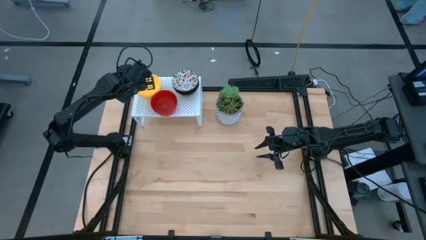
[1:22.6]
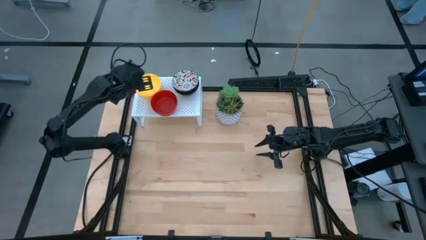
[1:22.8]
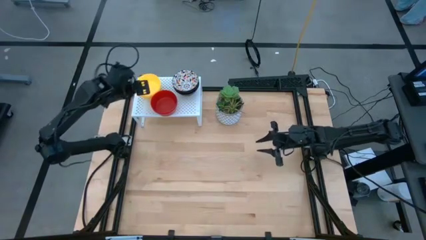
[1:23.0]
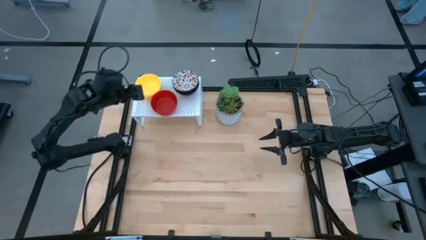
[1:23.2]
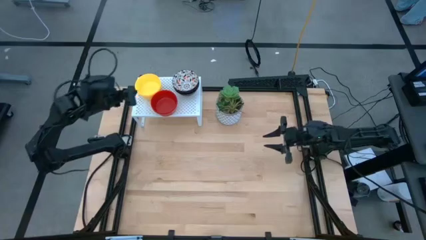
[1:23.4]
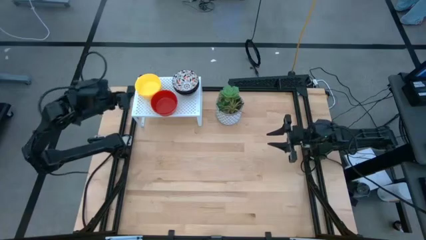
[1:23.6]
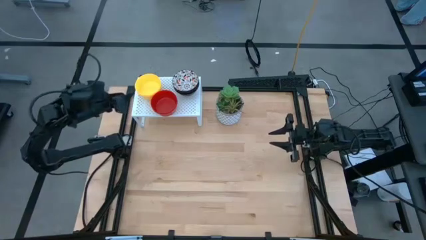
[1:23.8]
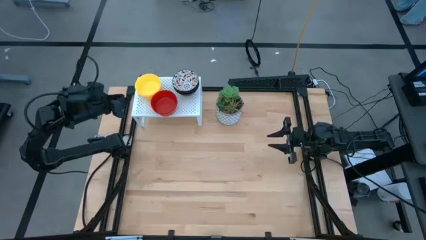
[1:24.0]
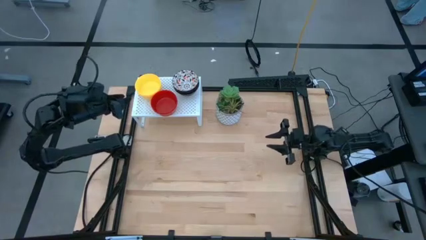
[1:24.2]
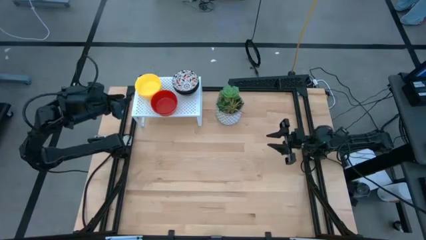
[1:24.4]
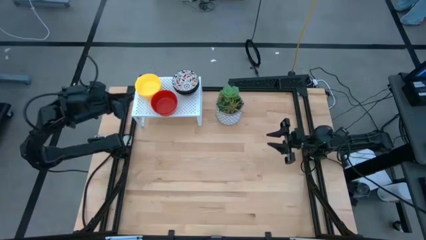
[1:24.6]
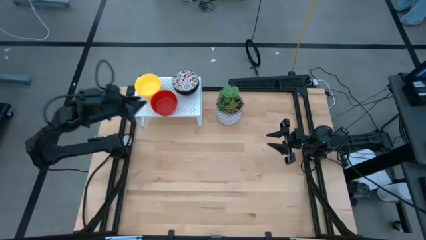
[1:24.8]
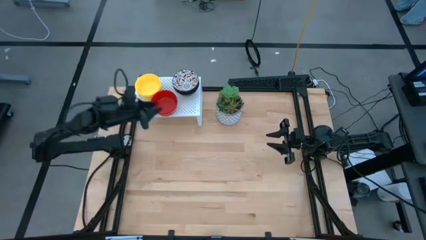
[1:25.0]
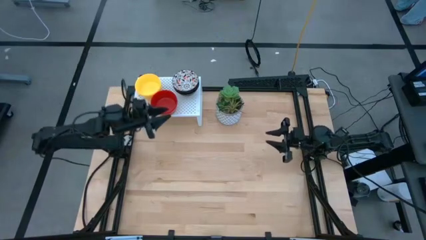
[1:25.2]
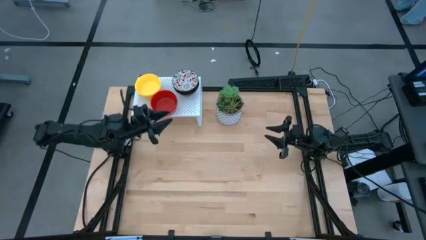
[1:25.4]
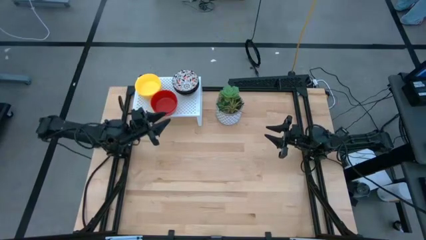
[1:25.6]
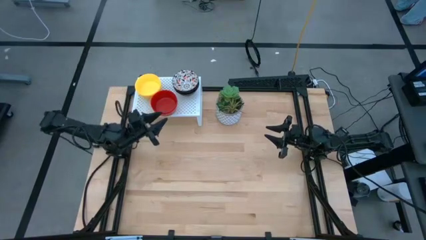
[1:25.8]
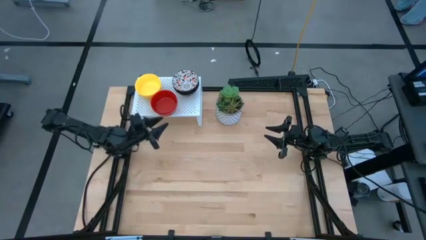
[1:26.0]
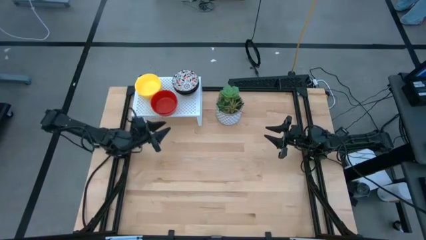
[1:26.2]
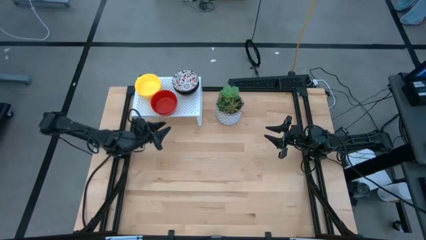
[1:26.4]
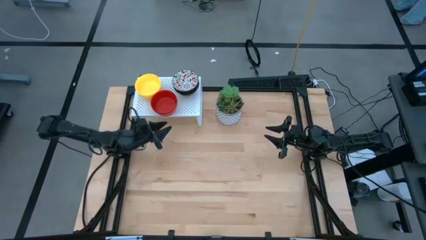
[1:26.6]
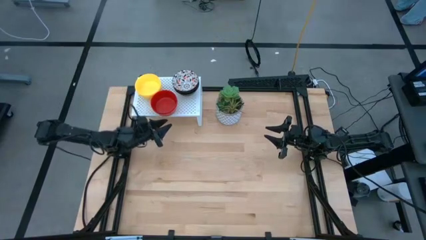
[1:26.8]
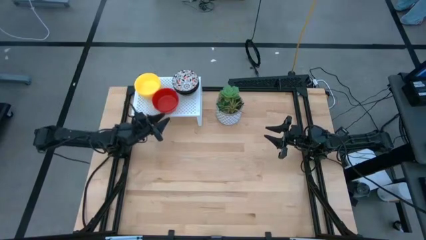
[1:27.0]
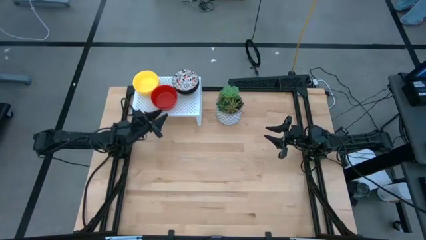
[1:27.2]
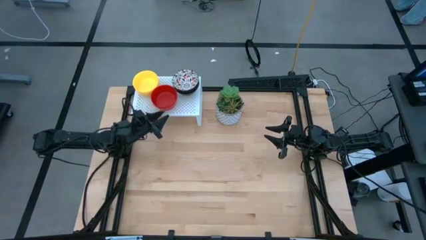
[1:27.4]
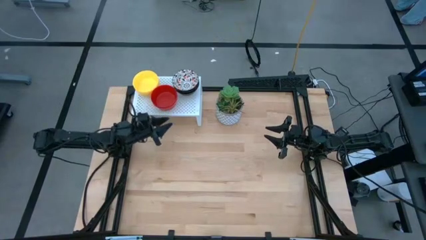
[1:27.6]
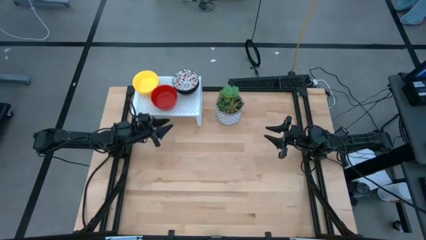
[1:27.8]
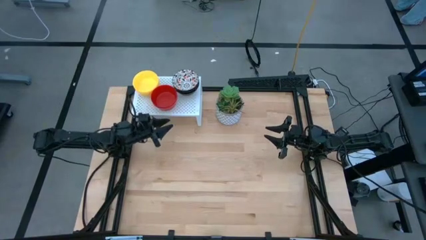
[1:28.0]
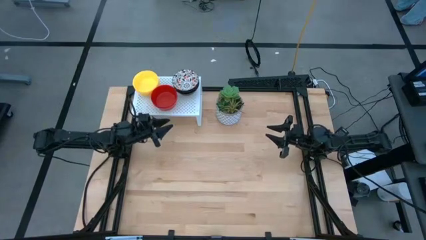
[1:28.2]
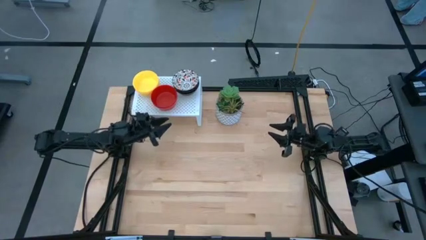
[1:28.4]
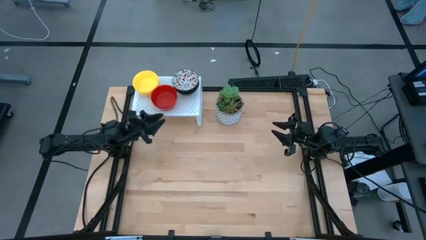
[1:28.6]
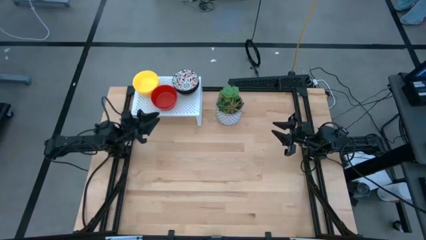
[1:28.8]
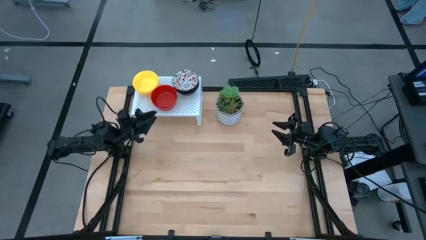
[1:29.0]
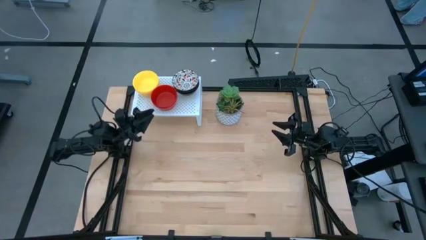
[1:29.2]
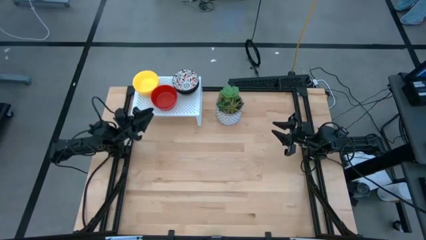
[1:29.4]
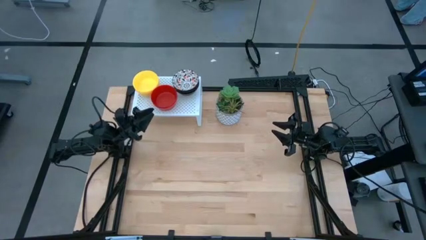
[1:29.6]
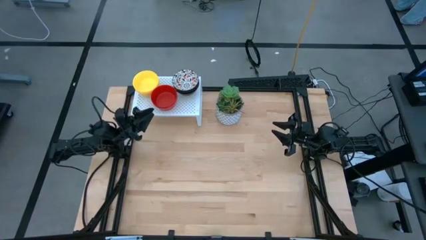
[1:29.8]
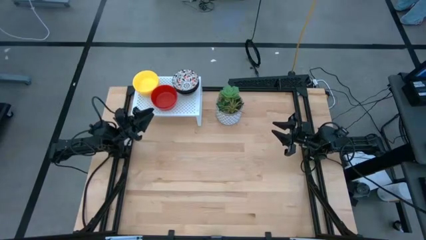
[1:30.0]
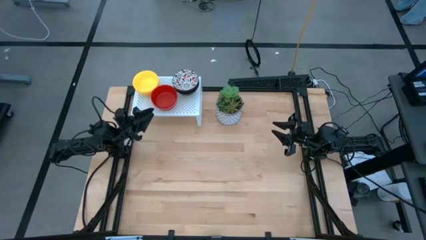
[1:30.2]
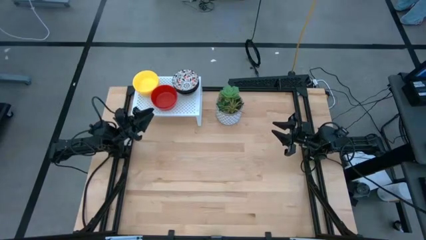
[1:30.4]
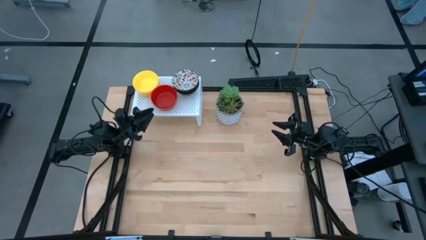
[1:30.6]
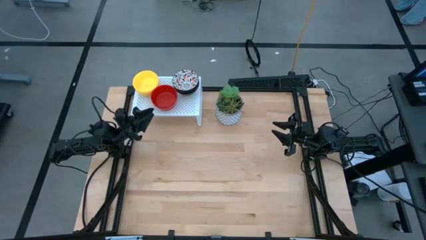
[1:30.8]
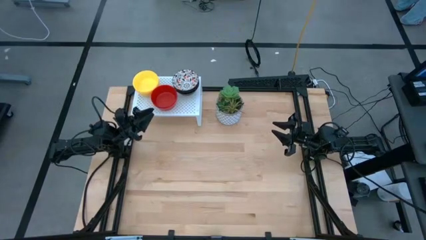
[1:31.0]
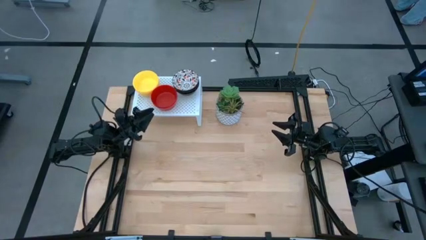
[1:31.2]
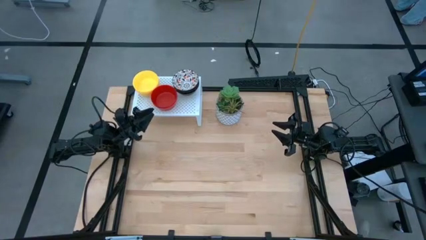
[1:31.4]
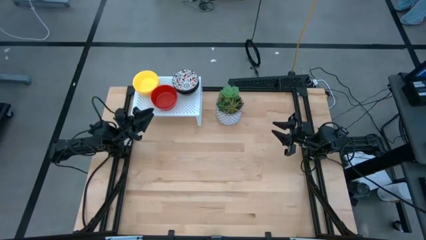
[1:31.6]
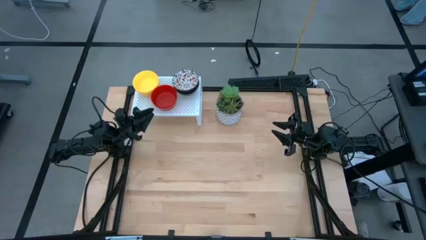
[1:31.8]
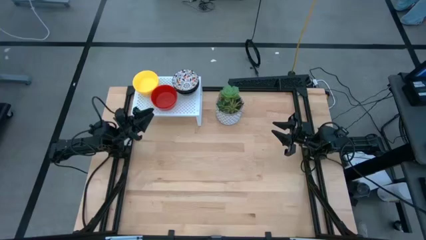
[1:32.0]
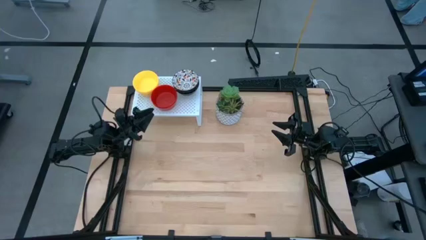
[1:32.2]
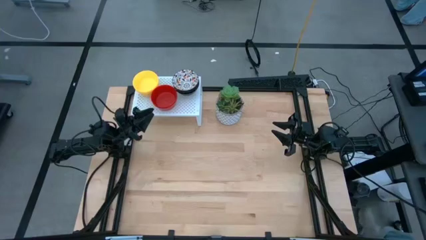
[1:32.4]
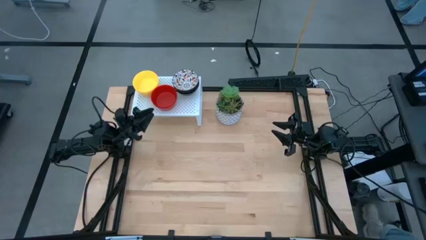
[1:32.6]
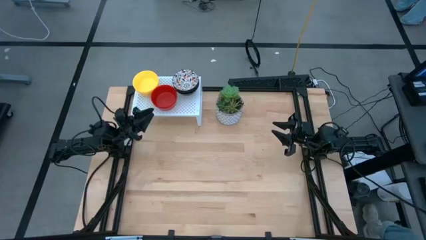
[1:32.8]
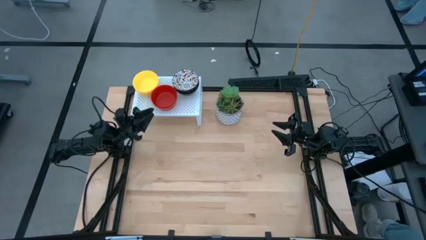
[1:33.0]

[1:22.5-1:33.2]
Task: Pick & Place Mini bowls
Return to Home Position
